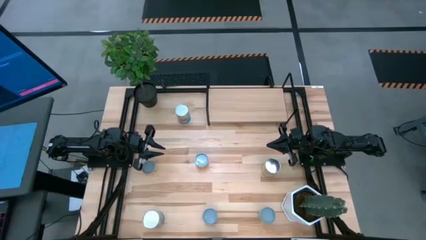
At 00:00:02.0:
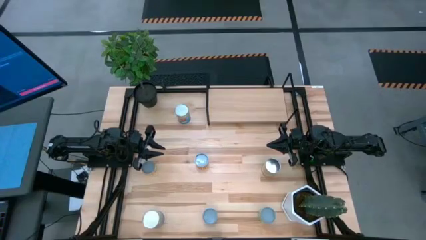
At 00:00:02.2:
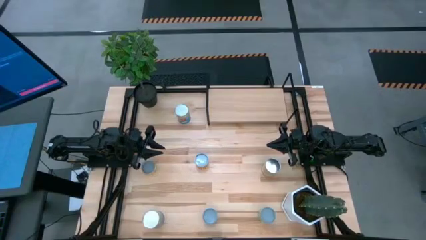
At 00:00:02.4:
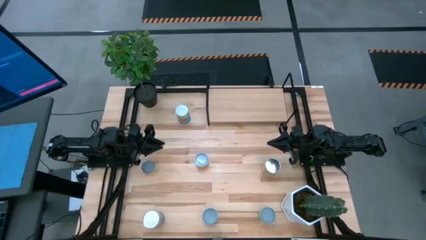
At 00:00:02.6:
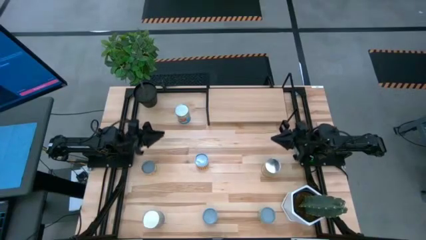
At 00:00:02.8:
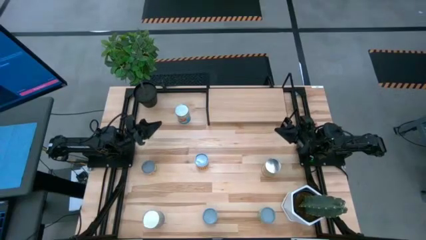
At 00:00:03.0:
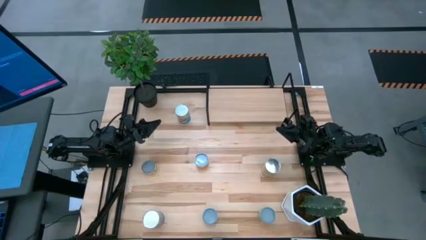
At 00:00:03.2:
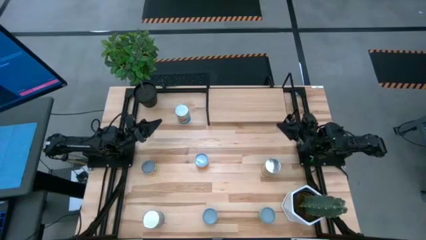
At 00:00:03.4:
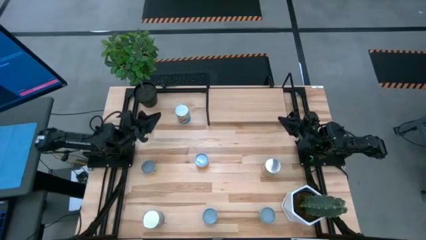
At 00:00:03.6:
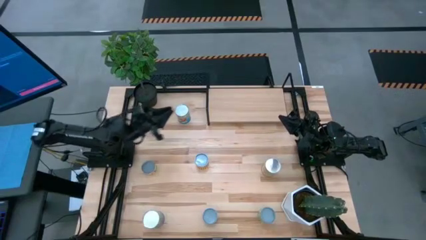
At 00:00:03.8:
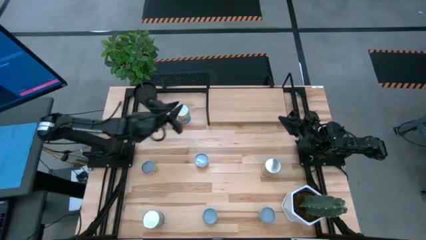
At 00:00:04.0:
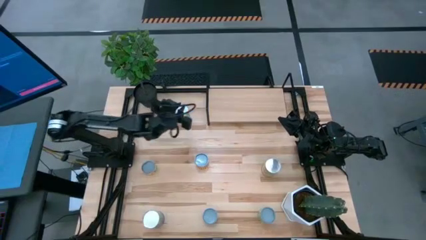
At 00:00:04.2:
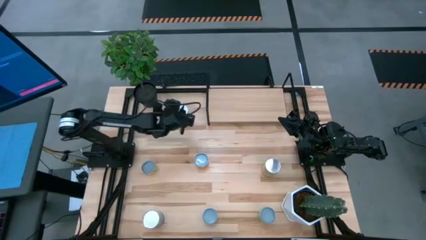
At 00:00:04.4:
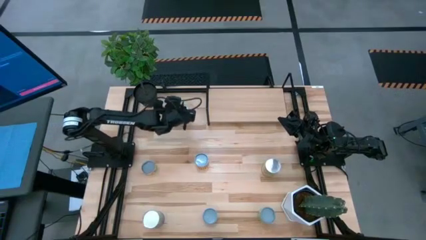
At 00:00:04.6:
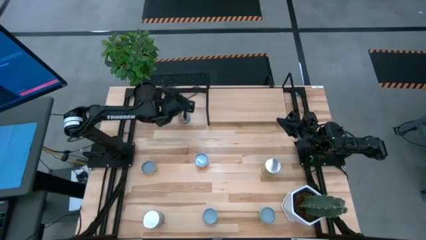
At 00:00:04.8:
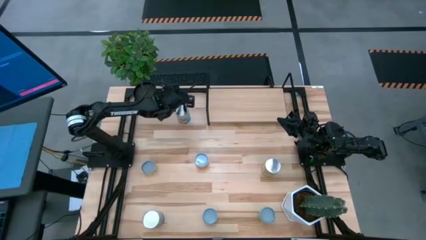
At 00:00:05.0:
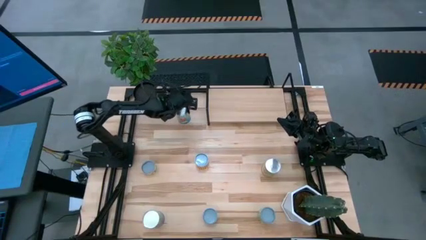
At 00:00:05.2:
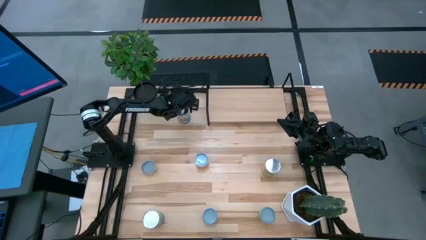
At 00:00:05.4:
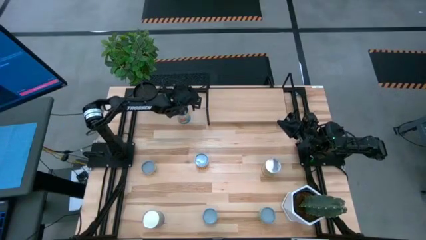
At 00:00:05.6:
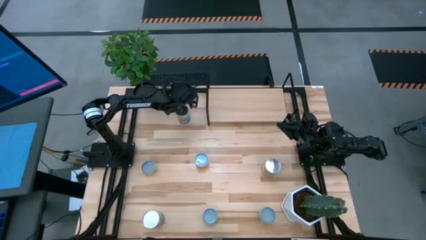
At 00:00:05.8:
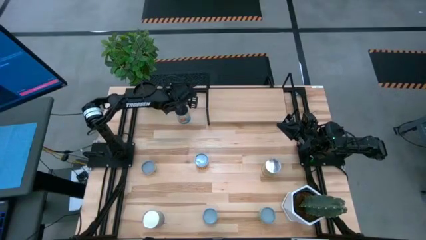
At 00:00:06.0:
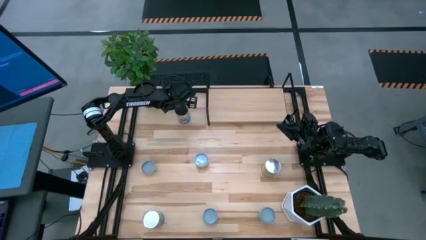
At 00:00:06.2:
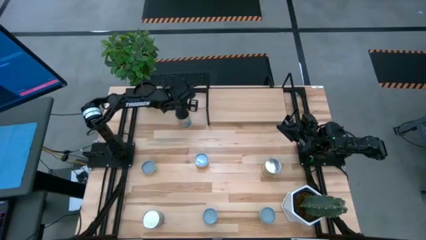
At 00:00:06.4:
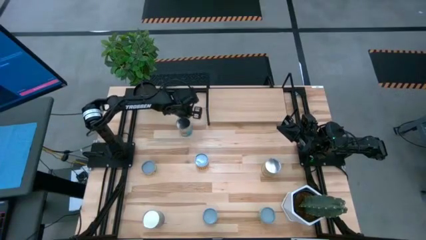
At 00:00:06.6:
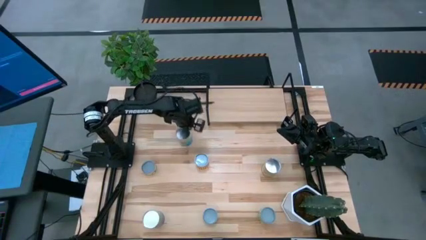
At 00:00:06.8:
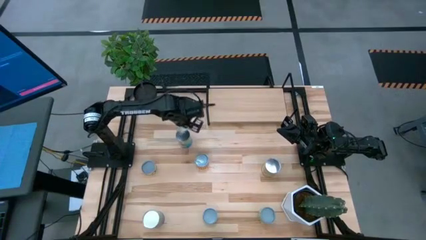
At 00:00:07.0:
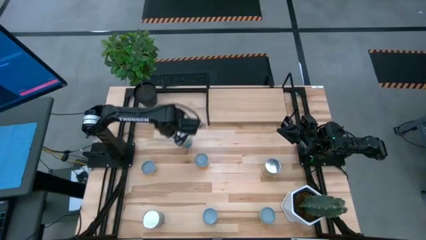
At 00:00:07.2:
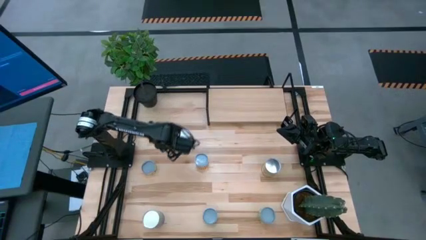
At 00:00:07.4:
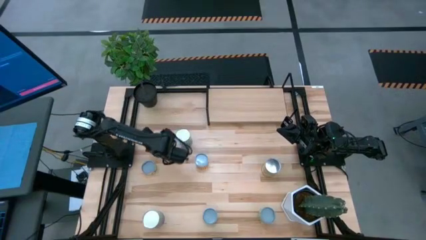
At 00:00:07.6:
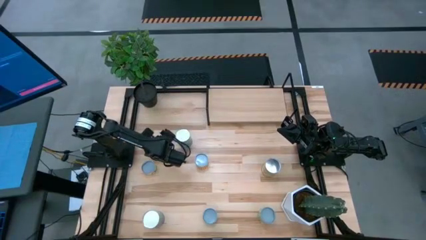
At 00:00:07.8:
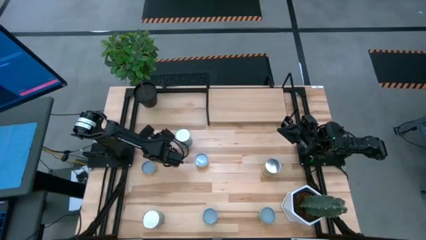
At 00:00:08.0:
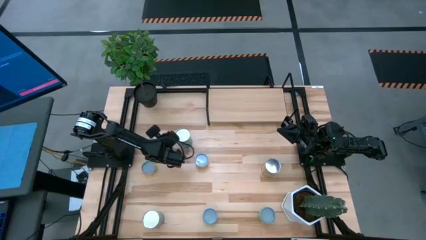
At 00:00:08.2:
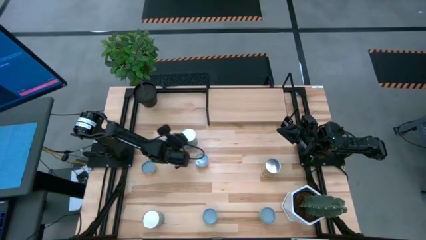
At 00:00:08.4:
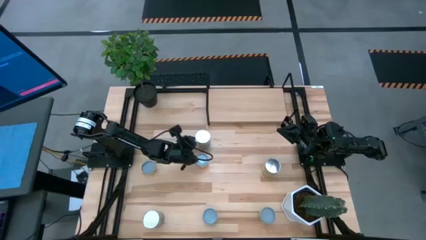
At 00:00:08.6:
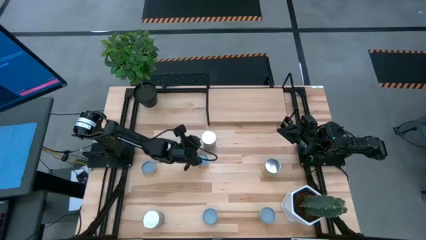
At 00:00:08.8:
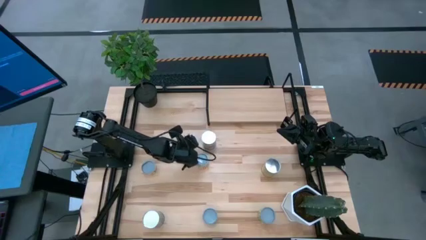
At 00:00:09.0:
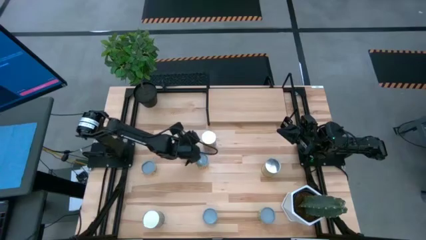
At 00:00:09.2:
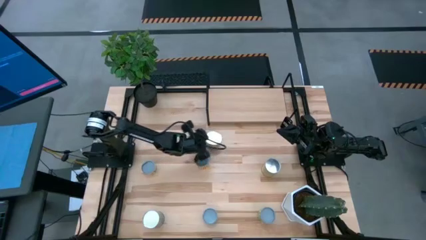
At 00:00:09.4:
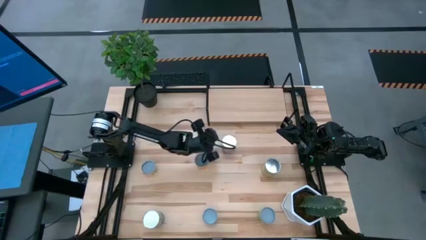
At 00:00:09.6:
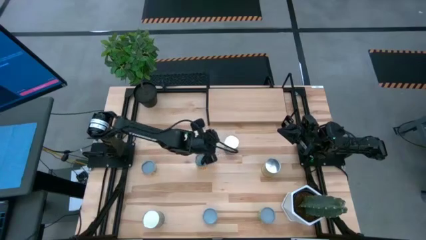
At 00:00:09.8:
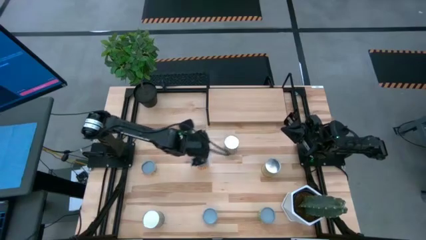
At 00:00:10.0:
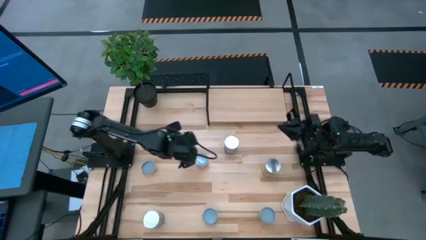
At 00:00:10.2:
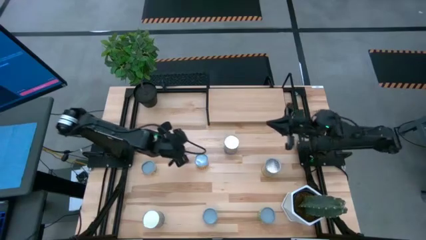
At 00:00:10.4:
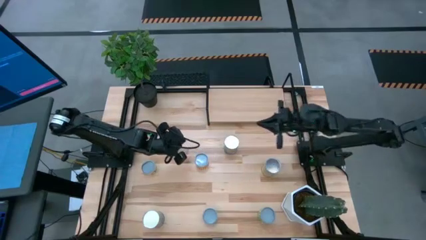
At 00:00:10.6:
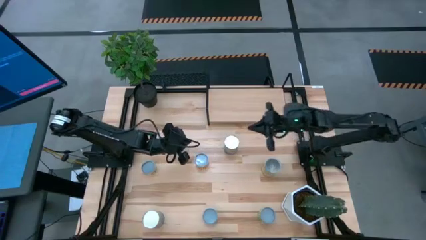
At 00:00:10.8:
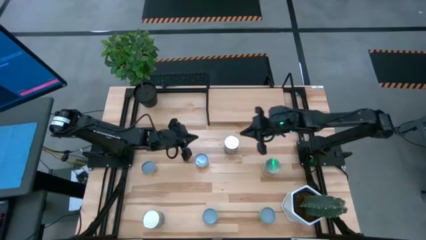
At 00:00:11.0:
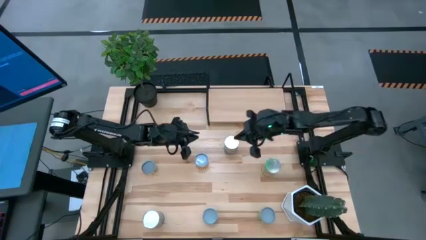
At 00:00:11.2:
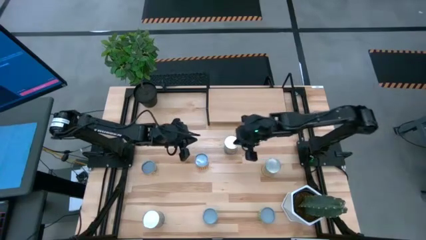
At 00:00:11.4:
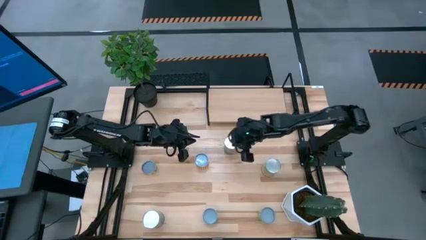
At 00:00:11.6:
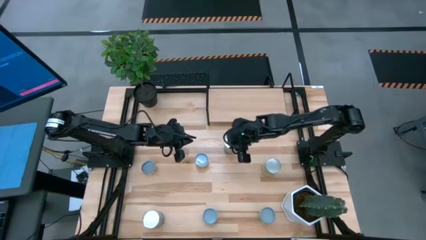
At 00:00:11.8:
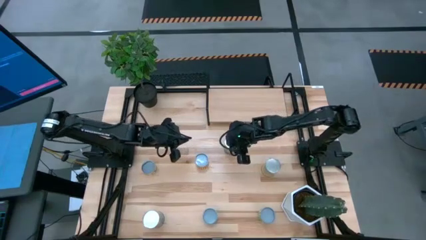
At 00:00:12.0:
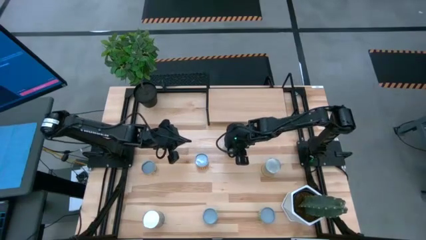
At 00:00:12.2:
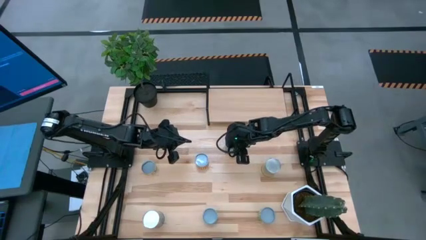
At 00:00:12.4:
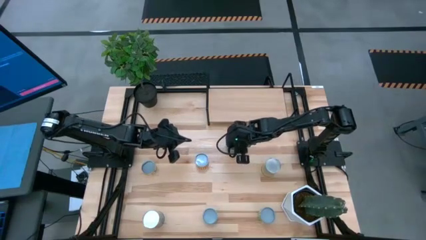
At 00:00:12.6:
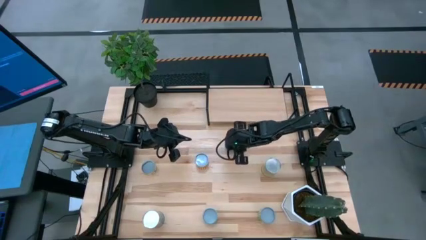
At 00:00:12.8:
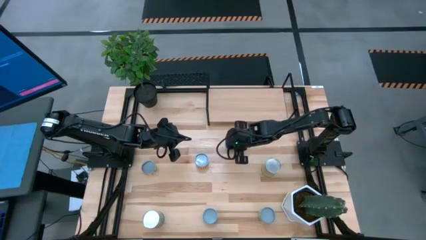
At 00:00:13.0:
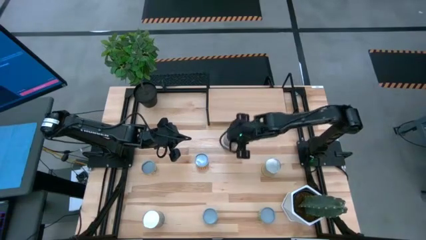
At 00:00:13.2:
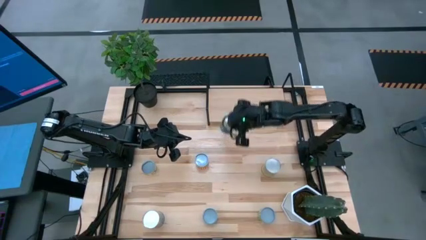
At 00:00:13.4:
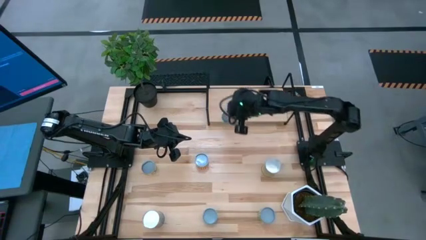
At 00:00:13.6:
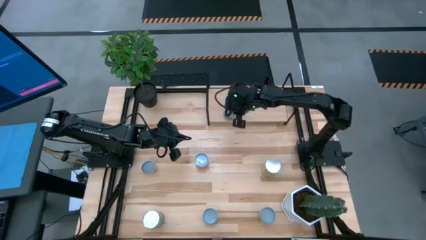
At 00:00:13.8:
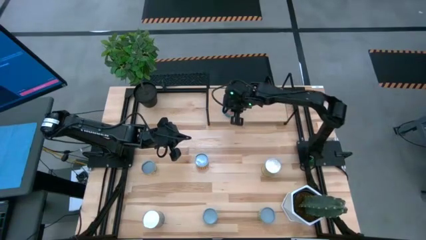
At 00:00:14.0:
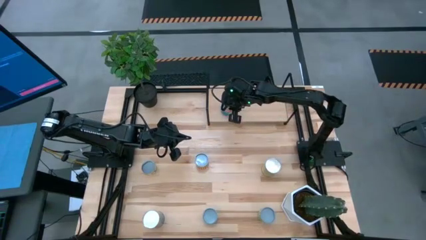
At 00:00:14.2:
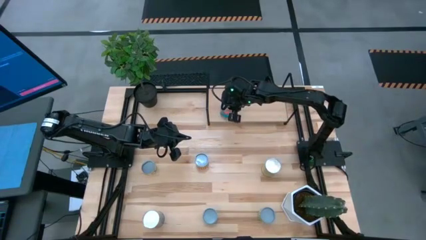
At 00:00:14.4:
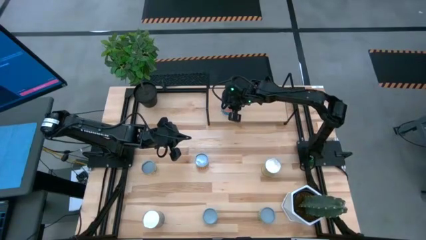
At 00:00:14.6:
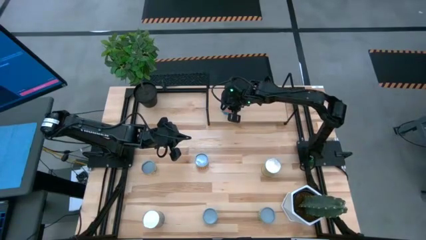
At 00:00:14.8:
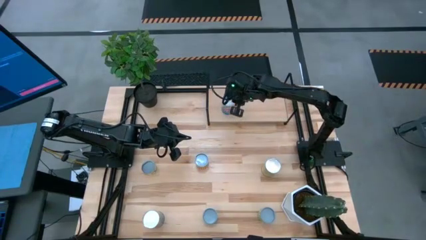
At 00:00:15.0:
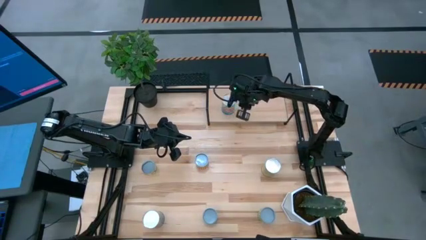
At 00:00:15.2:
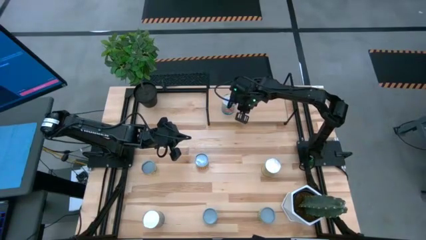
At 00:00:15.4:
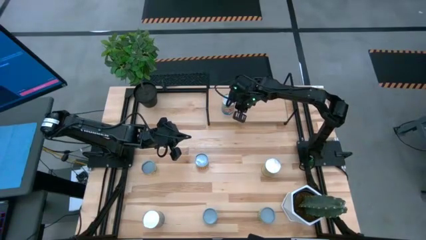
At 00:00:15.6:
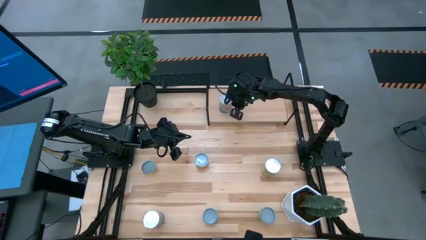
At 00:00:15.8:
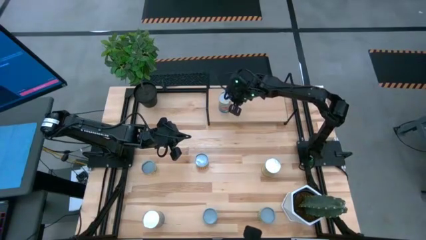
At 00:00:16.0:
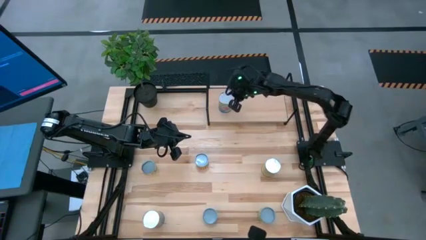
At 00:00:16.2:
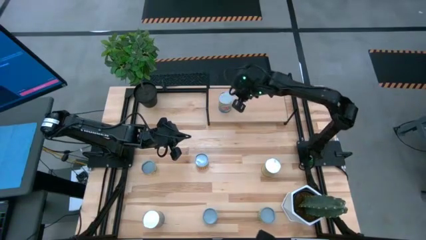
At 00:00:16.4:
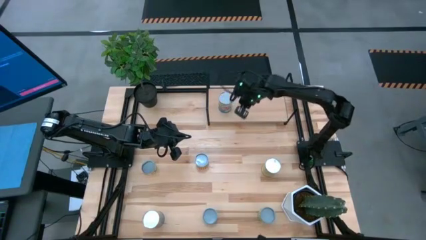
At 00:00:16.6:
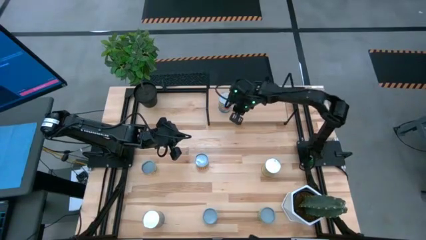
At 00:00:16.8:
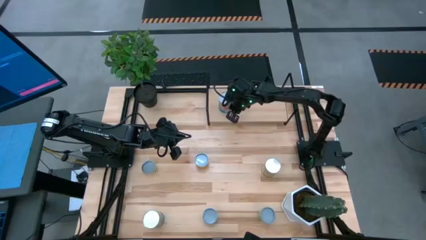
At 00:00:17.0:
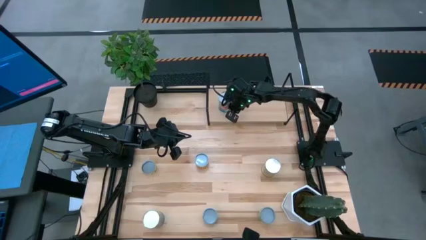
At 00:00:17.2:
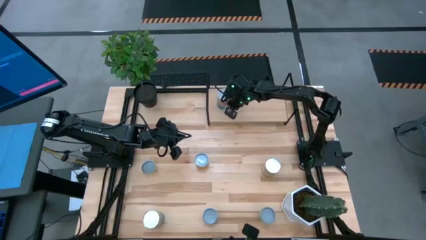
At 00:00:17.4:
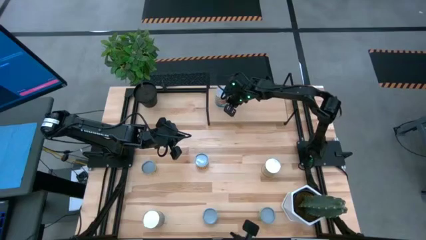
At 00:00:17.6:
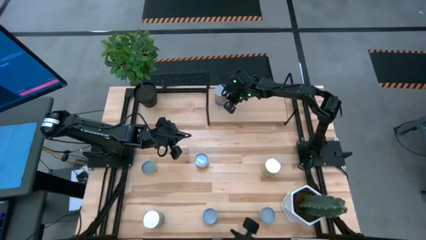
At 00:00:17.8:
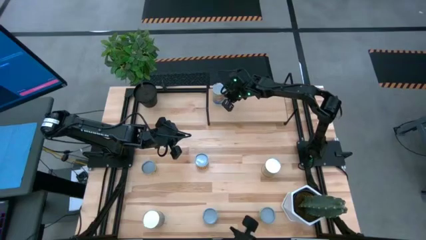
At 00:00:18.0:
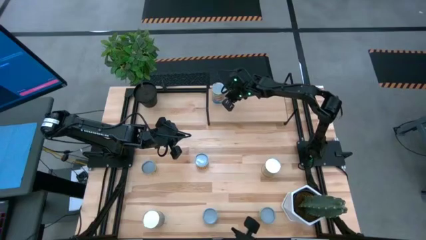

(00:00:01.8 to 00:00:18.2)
Task: Pick and place cans onto a shelf
Put the canned tomatoes on the shelf
